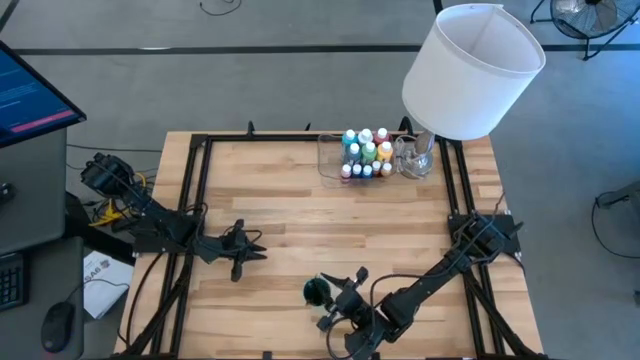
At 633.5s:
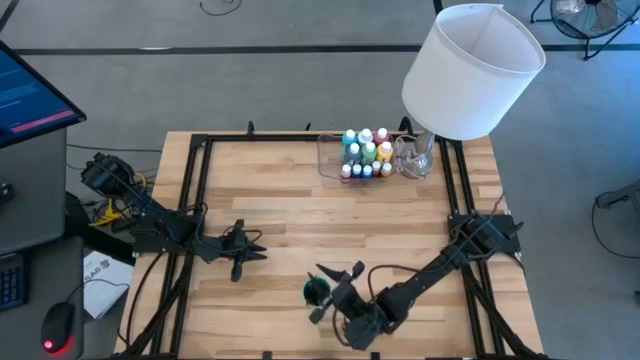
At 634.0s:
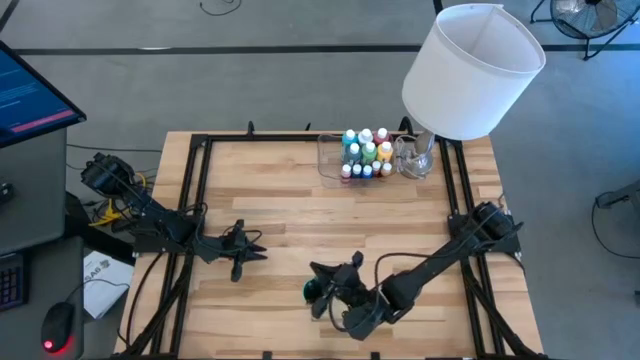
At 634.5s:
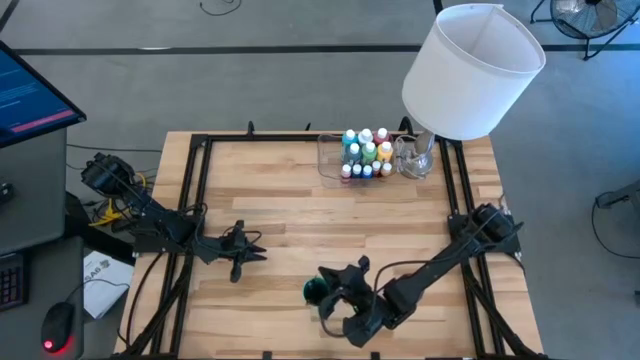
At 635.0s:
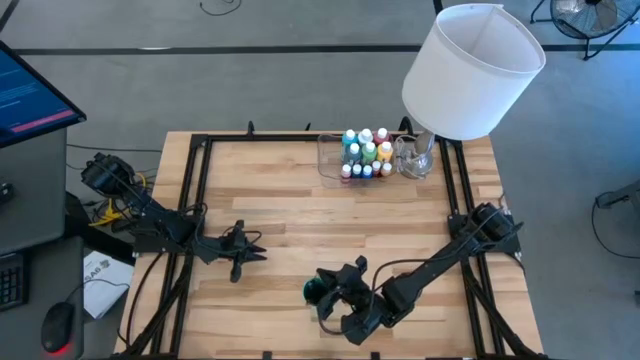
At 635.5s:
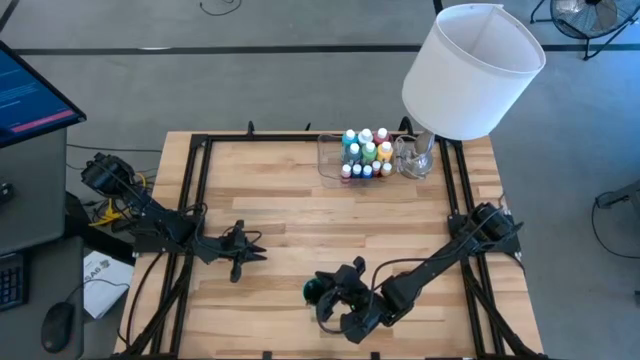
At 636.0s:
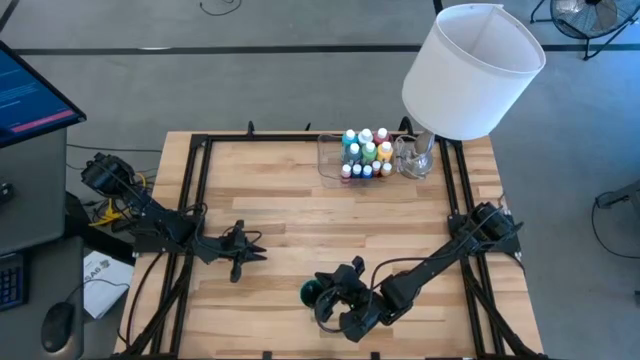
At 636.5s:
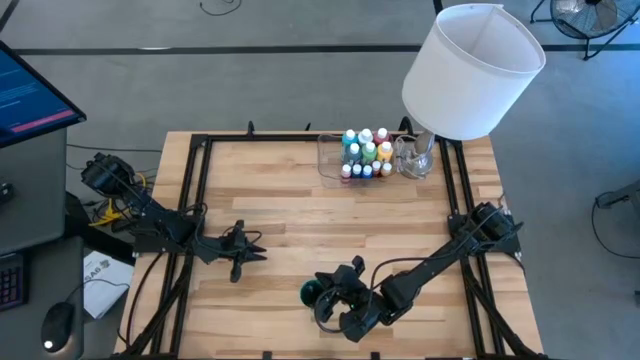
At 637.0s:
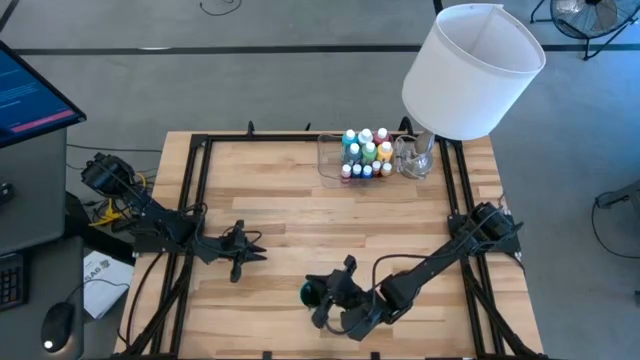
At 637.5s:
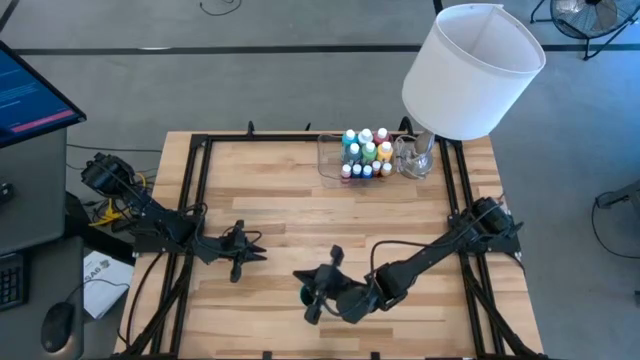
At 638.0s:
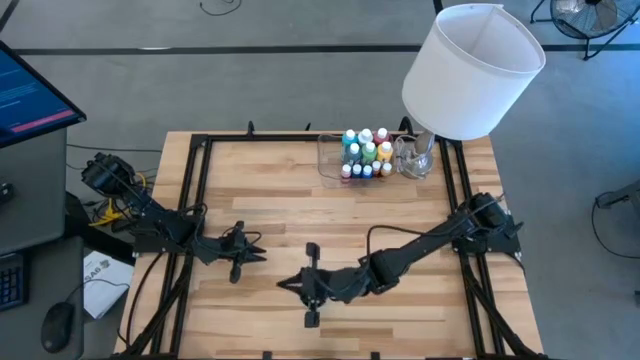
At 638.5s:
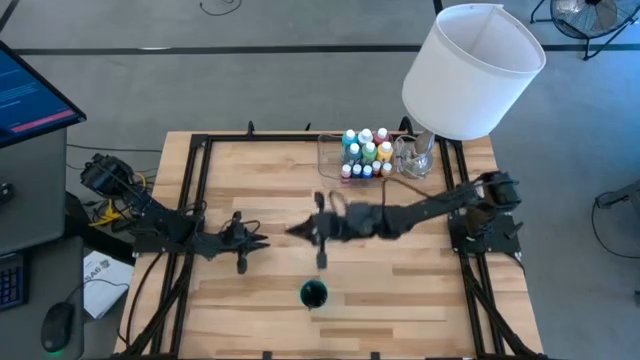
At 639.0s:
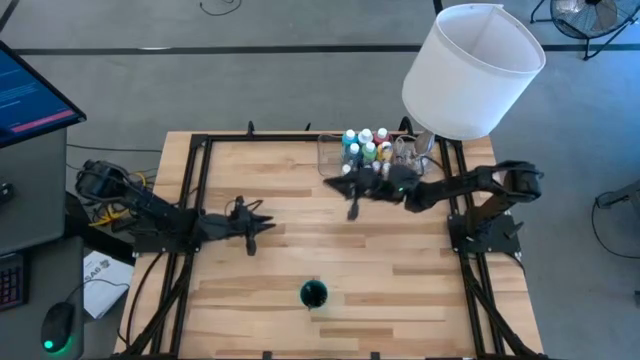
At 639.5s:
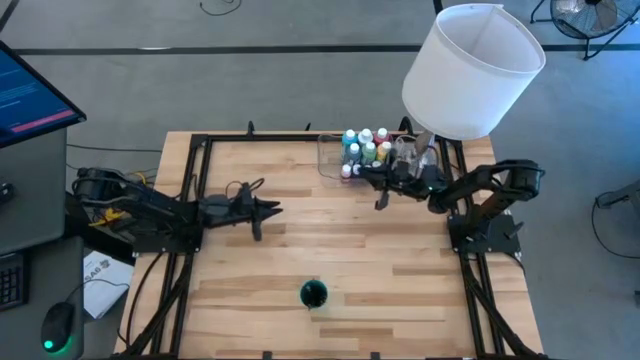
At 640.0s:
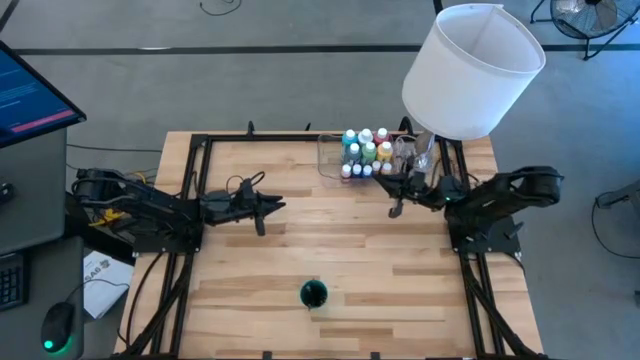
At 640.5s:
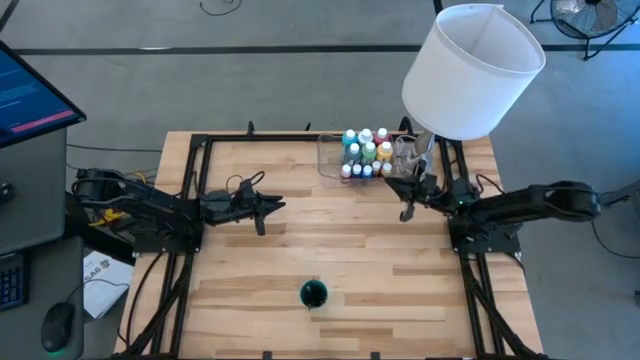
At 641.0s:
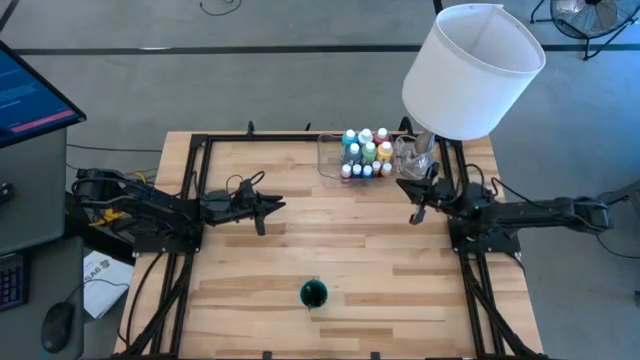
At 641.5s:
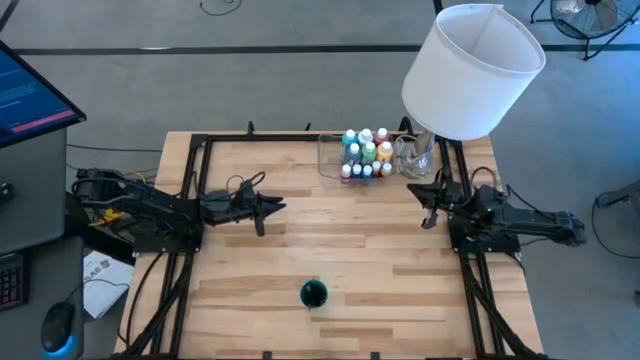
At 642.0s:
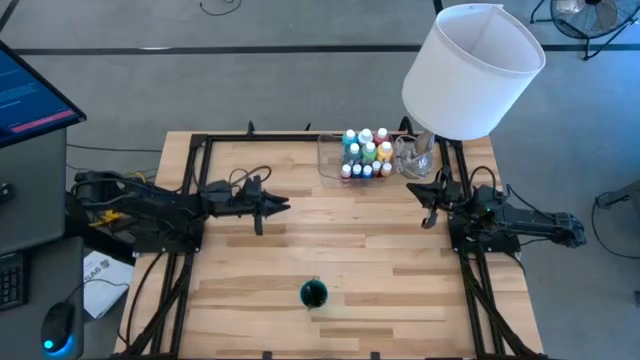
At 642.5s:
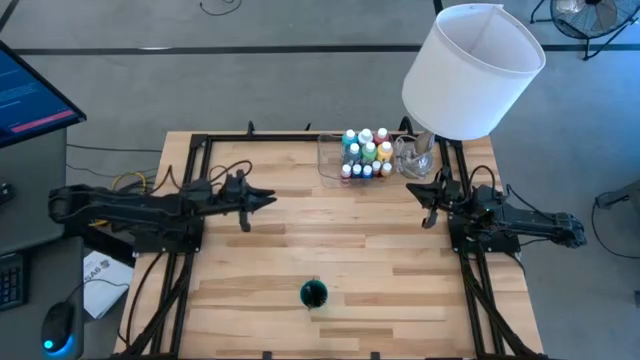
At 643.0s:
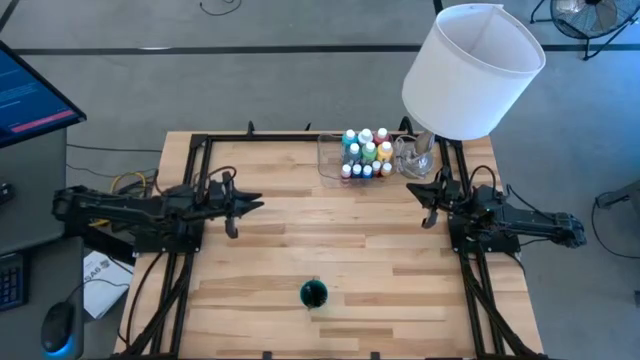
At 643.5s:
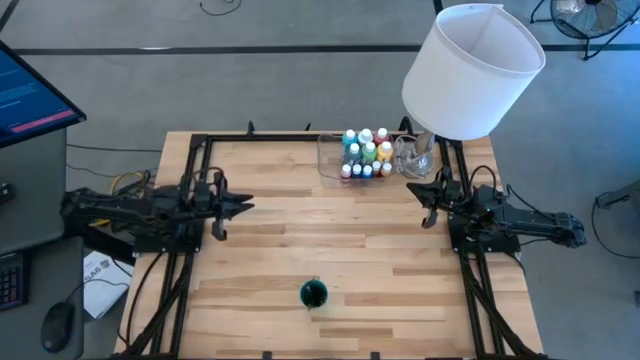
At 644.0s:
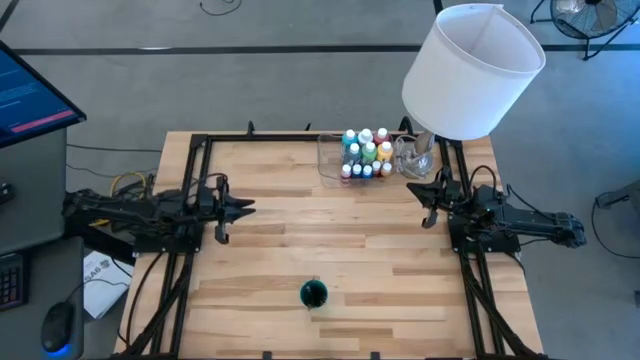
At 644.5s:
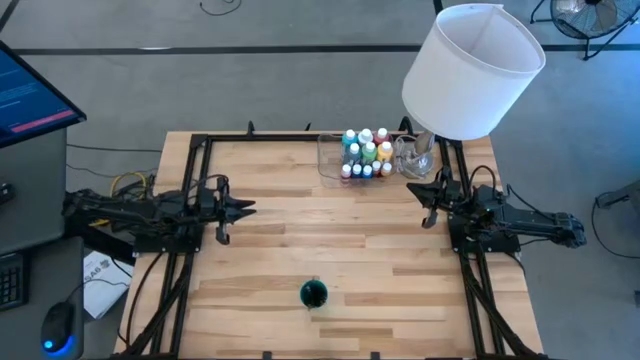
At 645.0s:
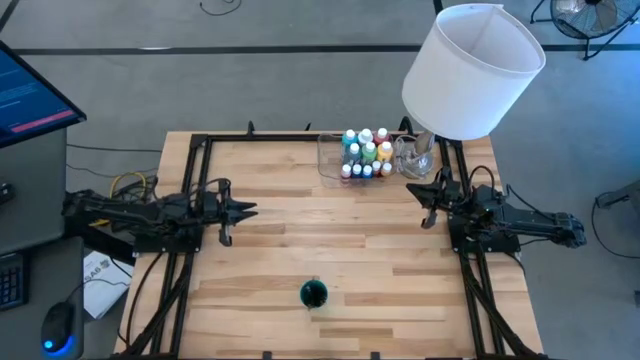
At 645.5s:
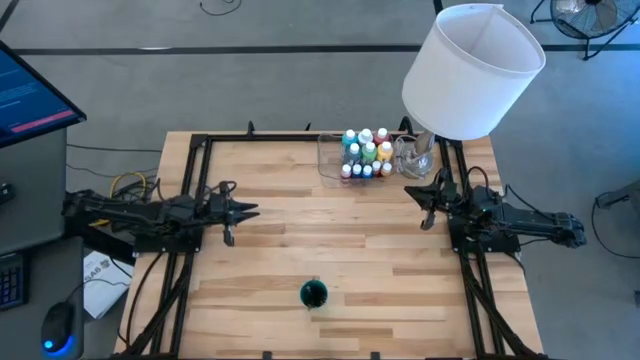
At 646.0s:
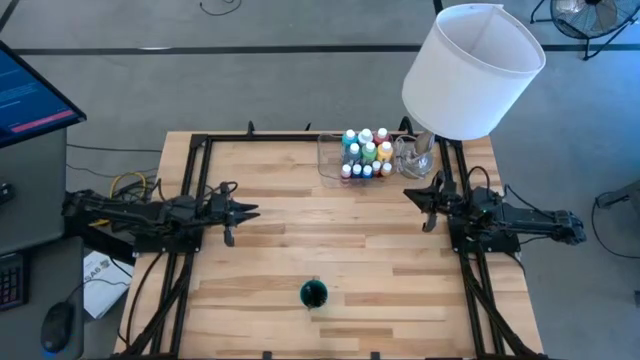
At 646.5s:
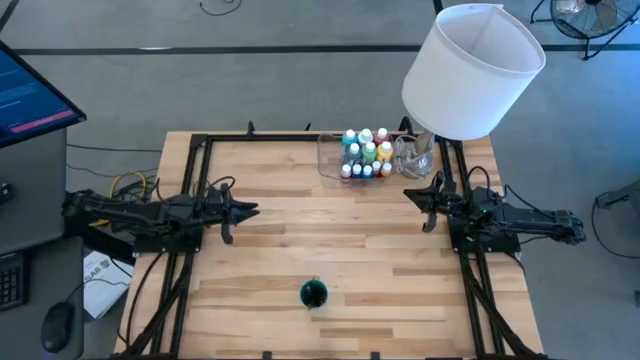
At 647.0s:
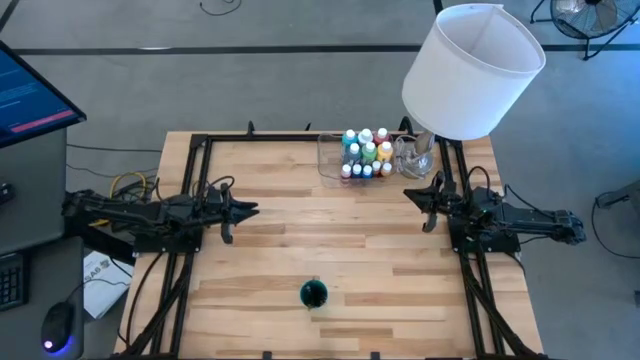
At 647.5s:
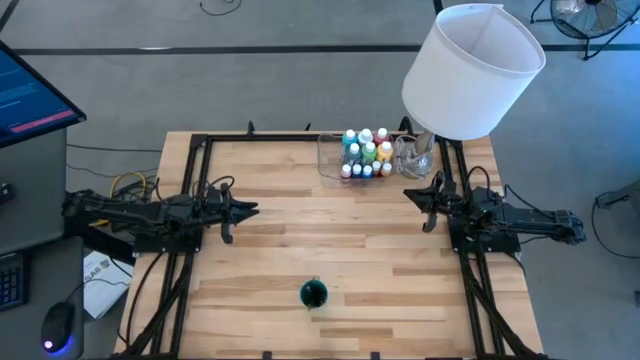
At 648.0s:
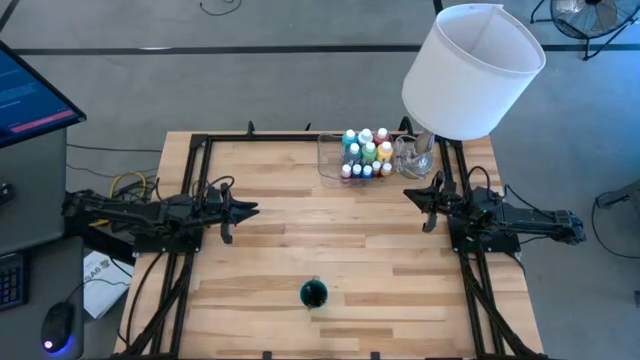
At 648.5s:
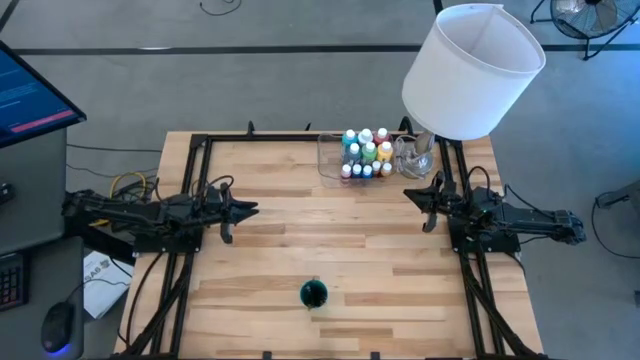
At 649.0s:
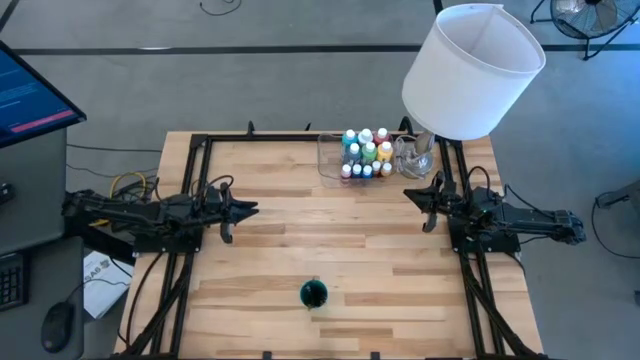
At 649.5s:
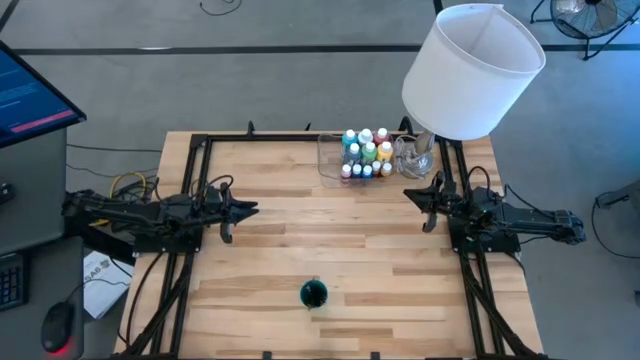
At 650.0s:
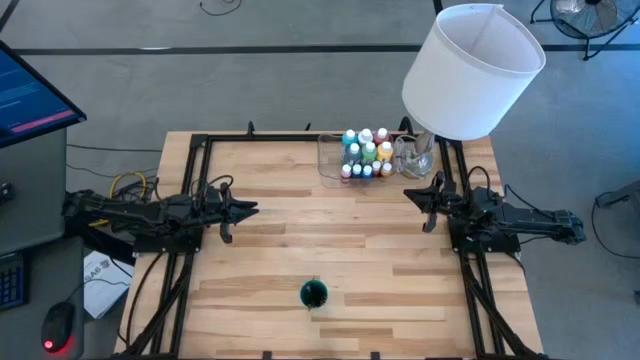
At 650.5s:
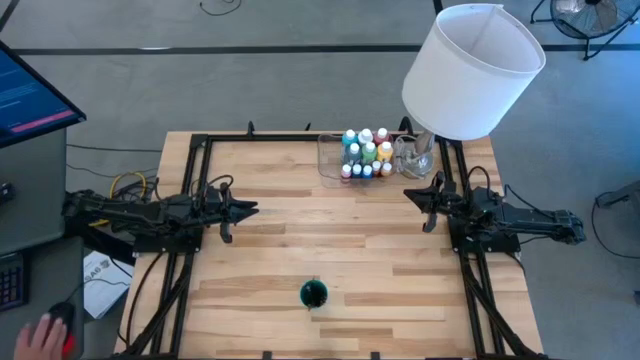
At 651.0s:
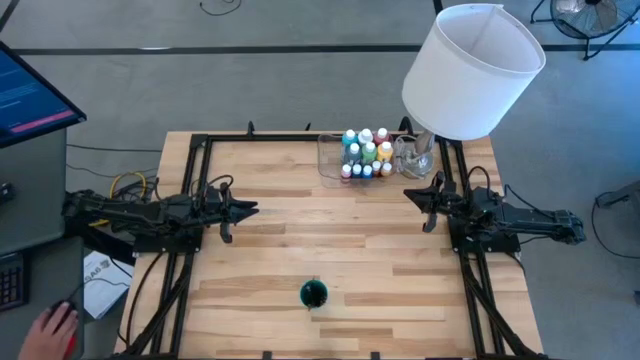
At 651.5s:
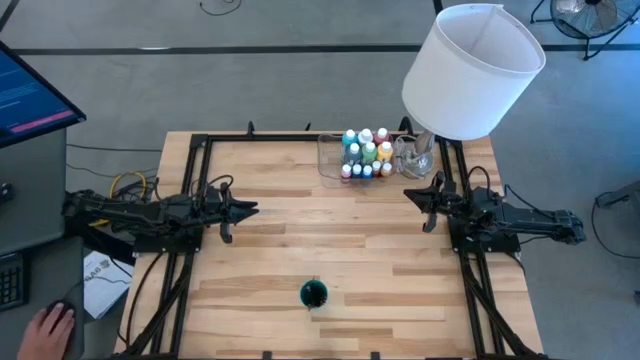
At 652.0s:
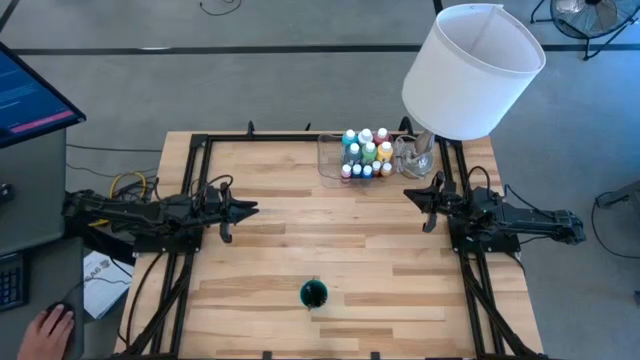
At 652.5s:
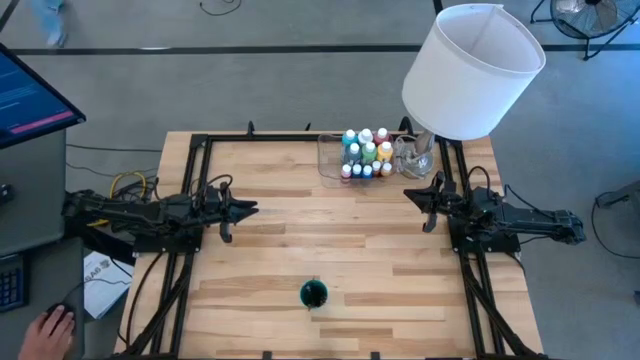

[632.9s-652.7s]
Task: Pick & Place Paint Supplies
Return to Home Position
